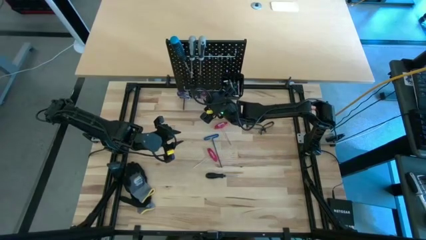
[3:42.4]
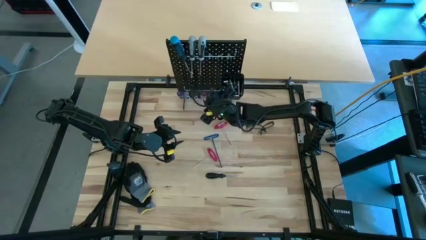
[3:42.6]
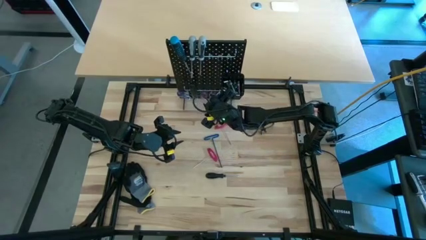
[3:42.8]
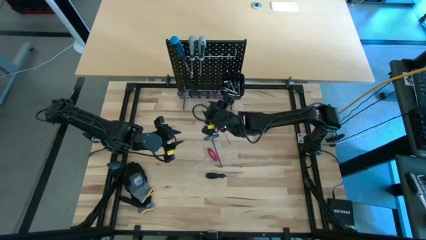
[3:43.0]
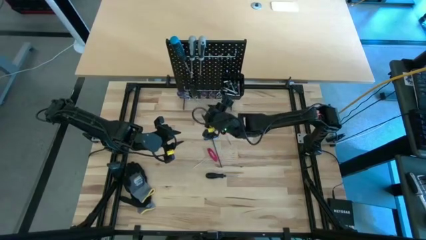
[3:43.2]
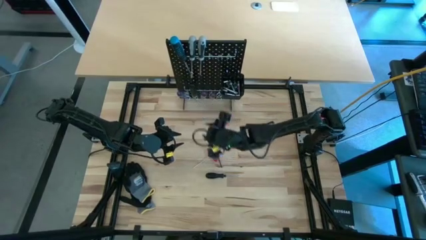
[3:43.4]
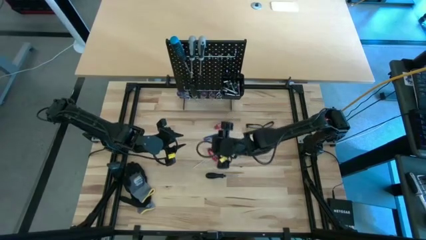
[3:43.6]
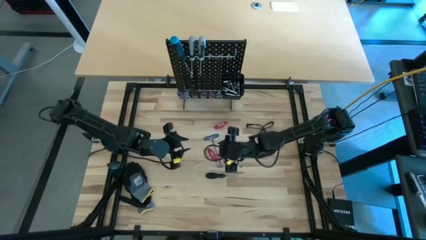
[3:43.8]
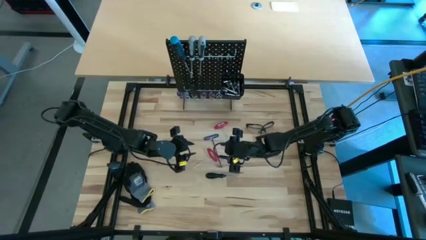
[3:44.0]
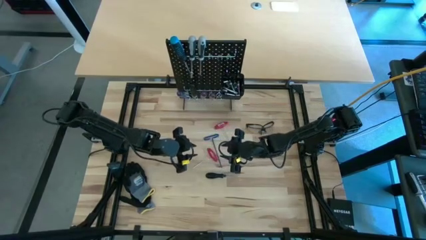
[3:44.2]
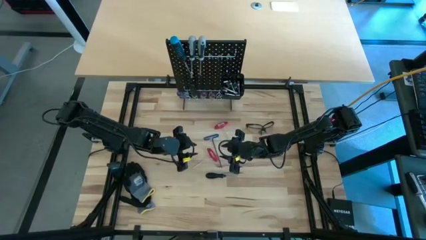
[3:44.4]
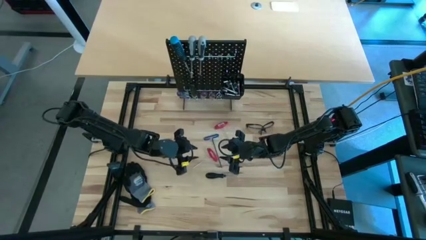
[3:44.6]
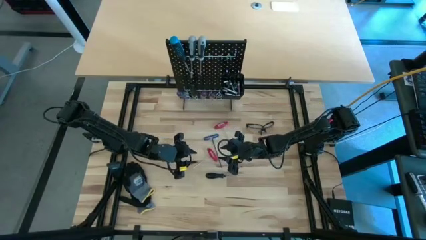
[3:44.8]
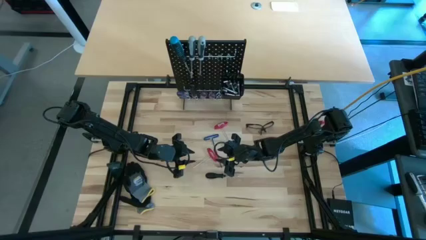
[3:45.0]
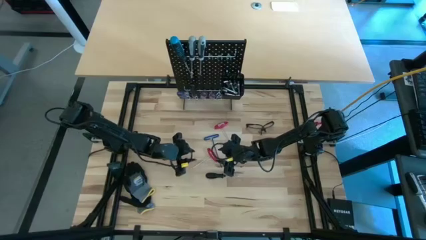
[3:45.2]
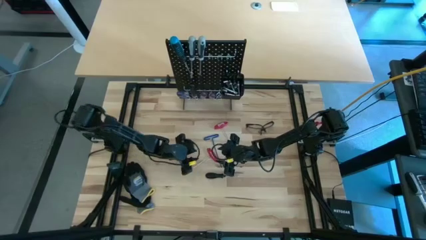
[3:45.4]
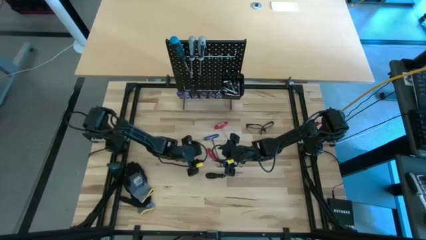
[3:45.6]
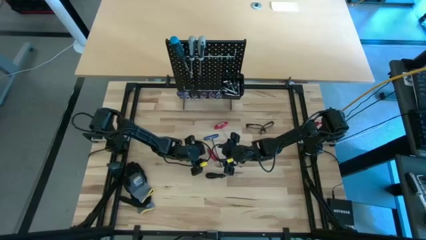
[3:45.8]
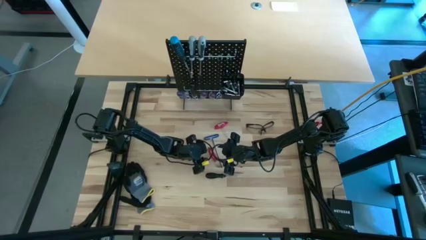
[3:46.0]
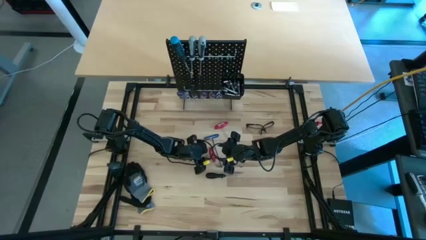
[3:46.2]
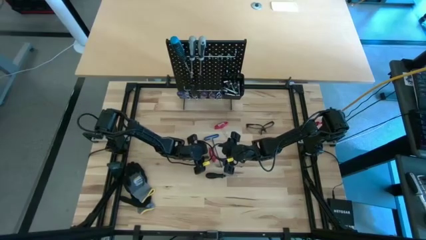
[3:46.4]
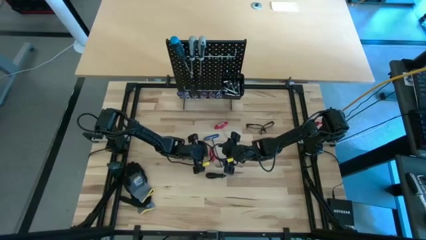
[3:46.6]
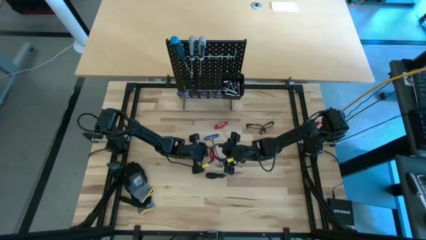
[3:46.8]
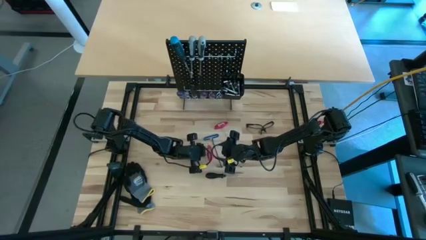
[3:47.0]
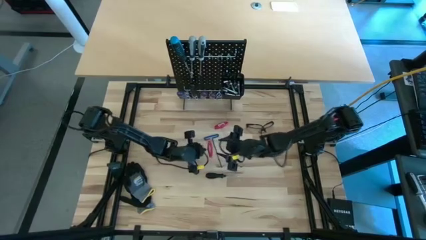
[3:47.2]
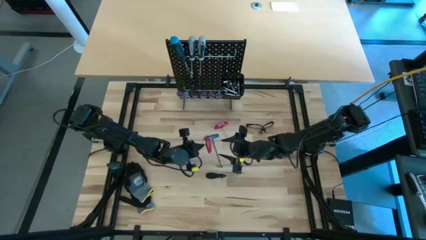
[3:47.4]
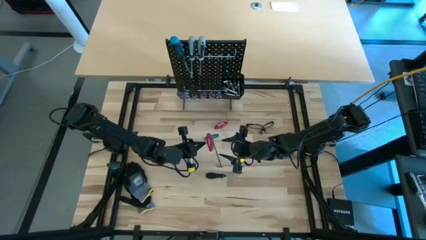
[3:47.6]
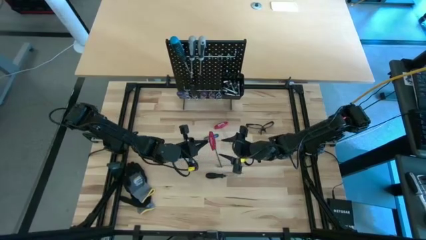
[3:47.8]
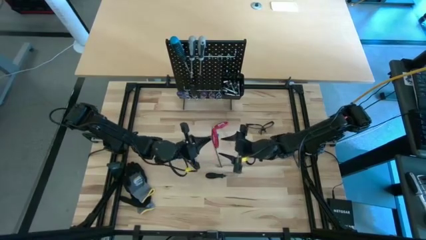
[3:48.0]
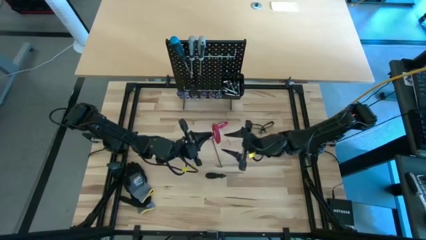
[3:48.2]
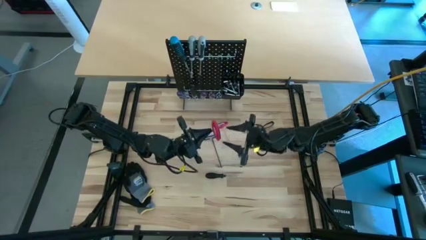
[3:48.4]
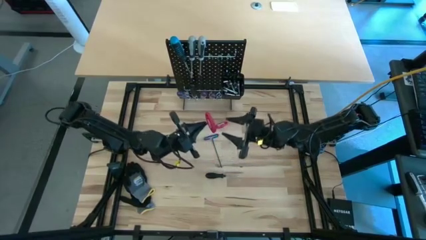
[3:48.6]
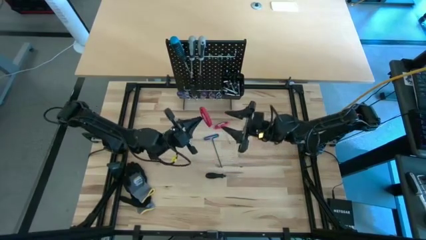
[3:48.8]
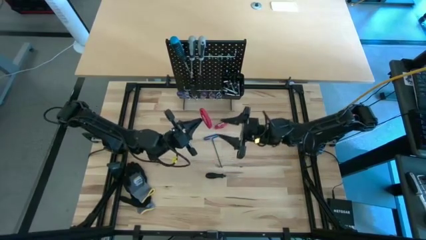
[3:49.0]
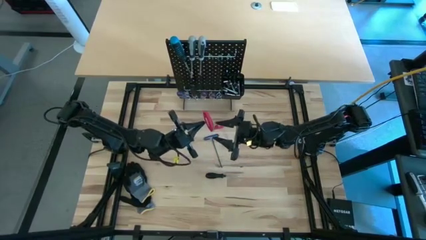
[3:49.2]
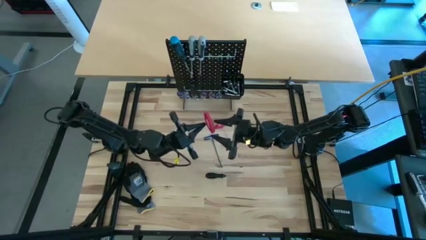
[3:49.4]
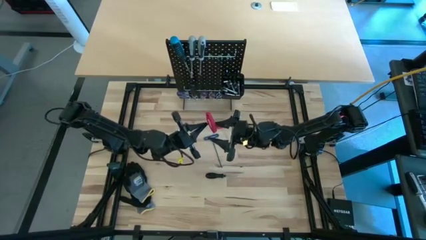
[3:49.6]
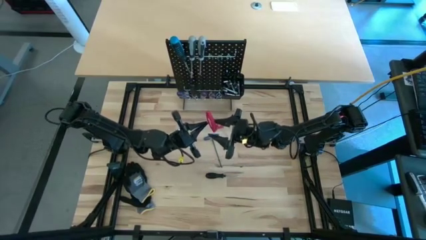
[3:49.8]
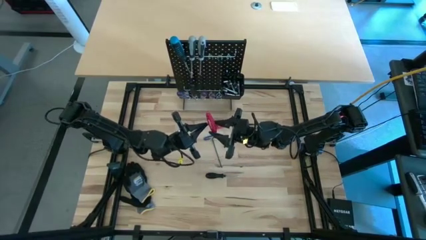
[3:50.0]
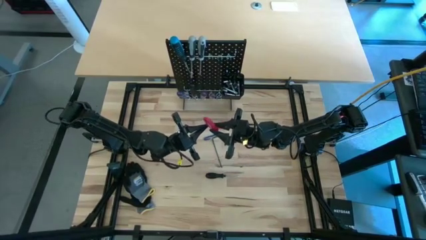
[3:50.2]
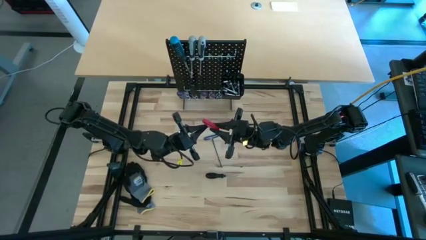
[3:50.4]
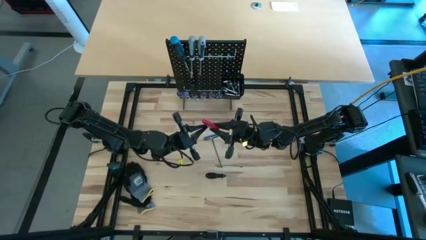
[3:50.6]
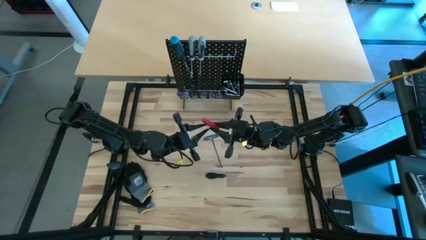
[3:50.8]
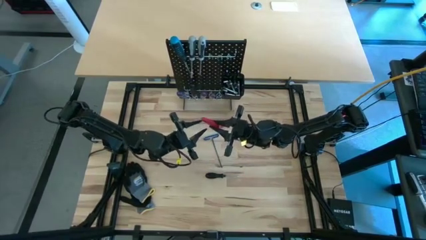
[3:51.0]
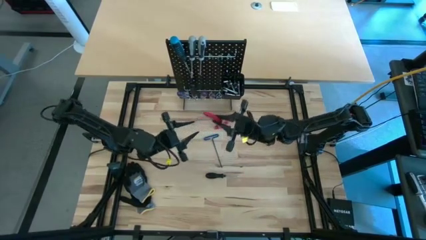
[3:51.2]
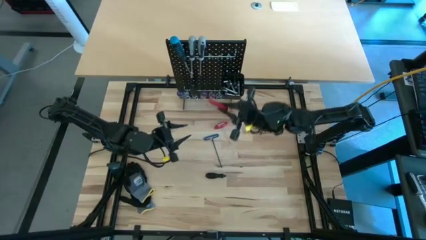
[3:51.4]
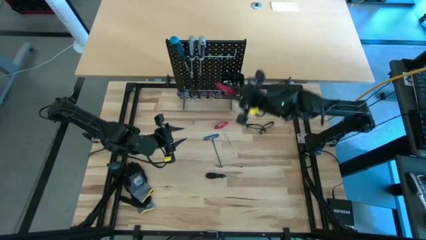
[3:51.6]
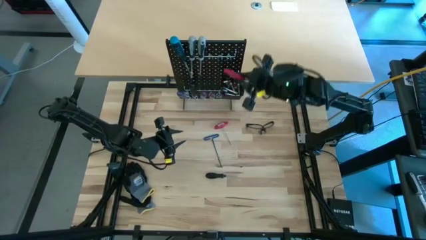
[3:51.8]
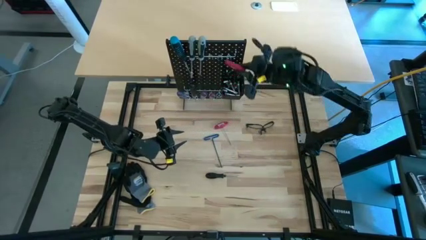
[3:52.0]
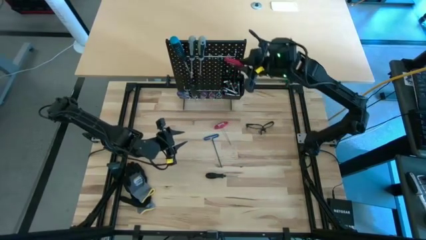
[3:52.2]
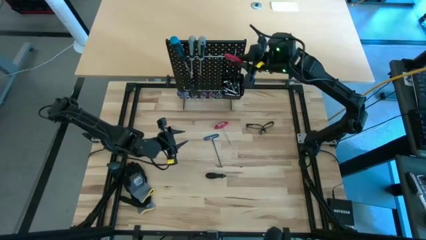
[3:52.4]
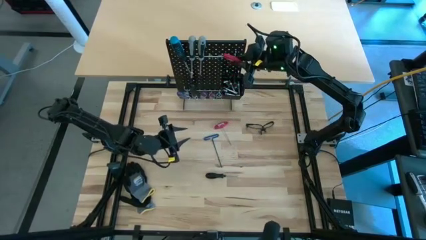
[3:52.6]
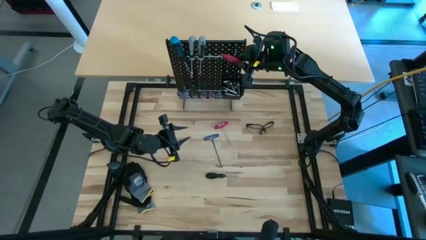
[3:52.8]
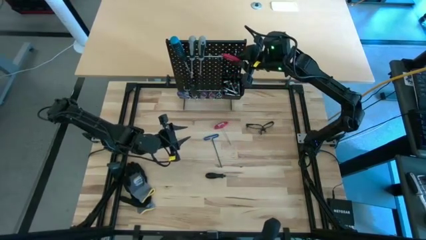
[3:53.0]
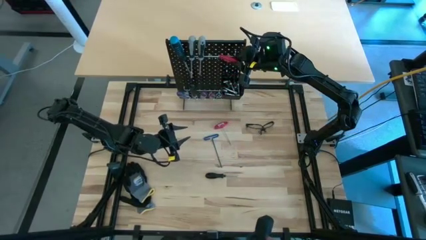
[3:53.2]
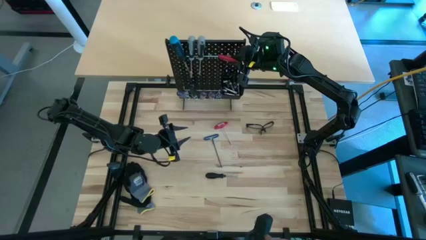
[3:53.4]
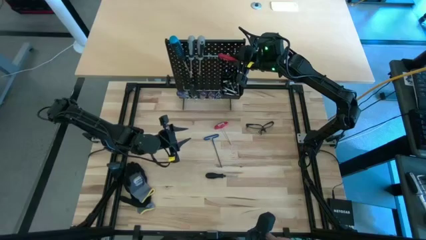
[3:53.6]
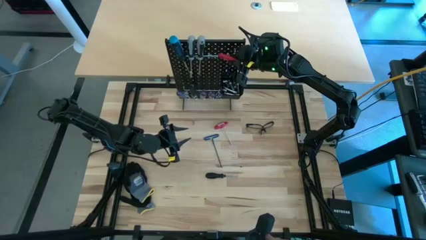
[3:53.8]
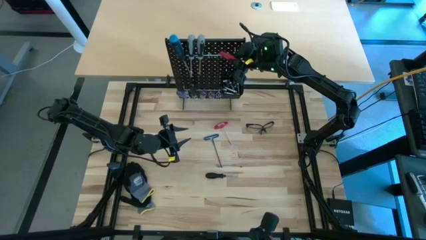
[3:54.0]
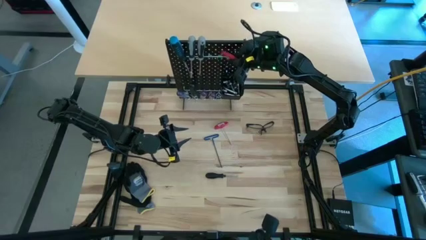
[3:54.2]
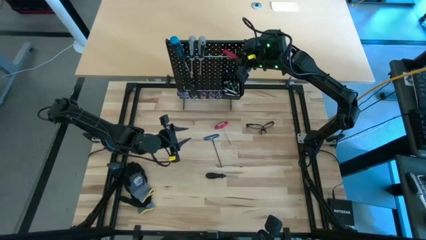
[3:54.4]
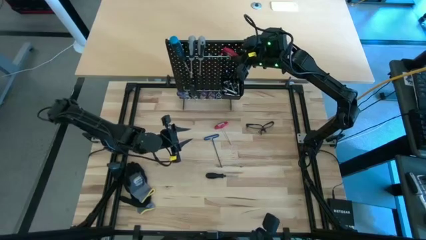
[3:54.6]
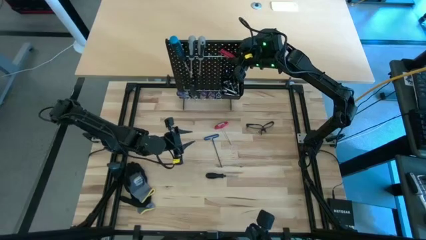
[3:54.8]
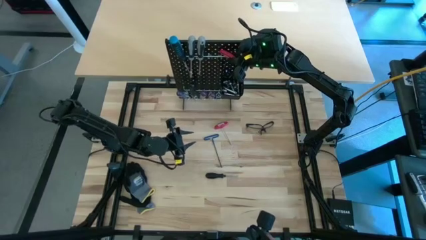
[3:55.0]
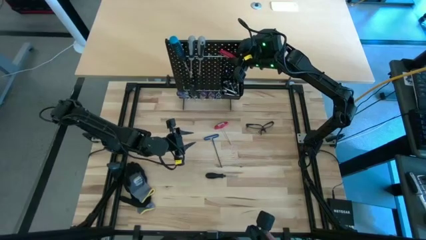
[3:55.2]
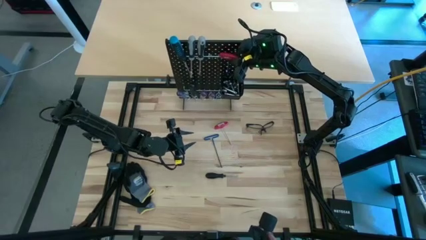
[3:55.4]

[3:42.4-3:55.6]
Task: Hang tools onto peg board
Hang the red allen wrench on the peg board
